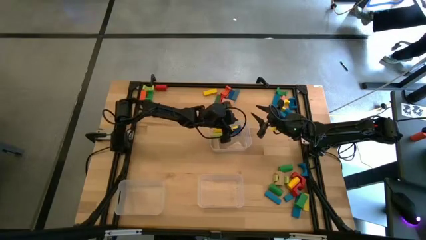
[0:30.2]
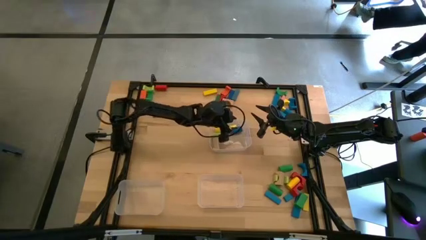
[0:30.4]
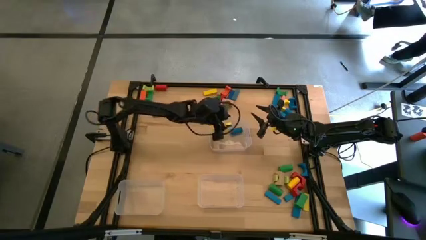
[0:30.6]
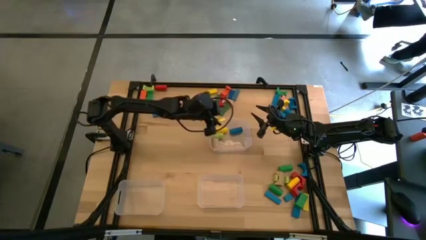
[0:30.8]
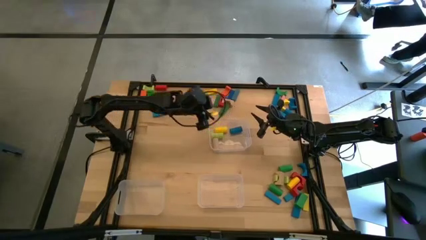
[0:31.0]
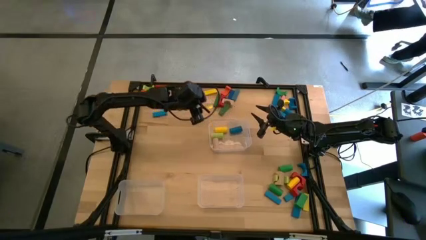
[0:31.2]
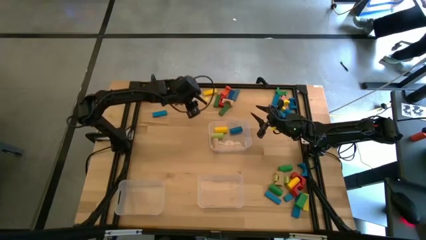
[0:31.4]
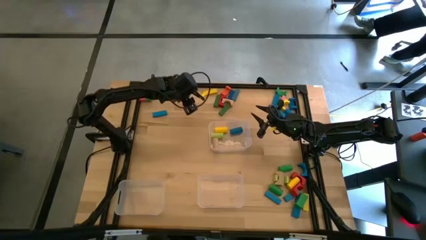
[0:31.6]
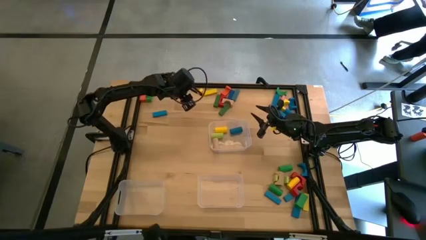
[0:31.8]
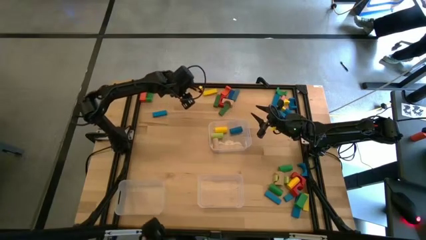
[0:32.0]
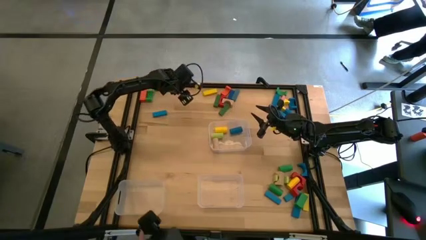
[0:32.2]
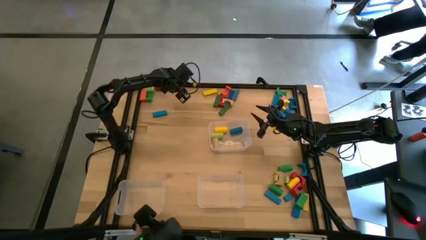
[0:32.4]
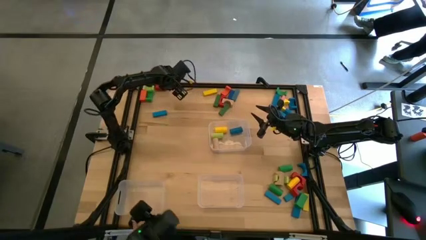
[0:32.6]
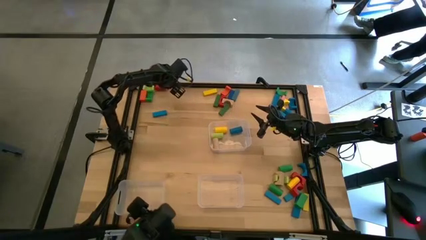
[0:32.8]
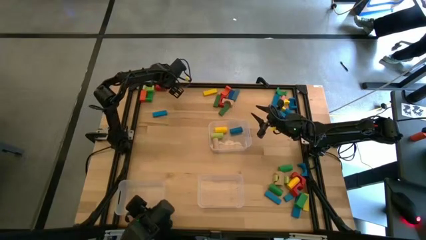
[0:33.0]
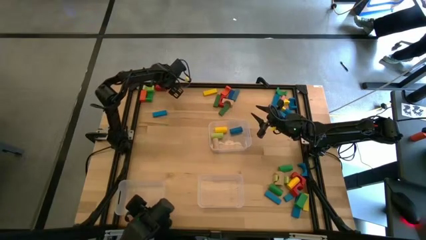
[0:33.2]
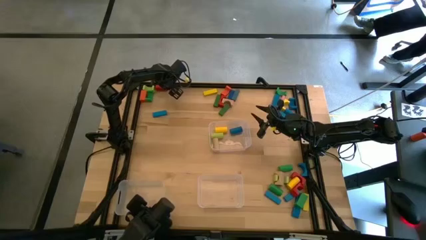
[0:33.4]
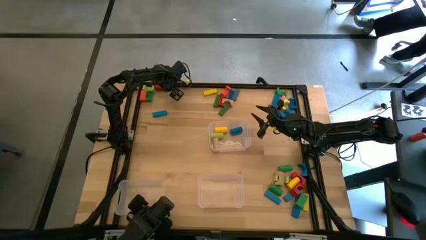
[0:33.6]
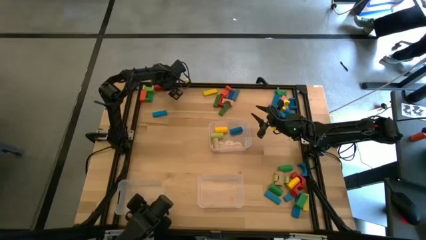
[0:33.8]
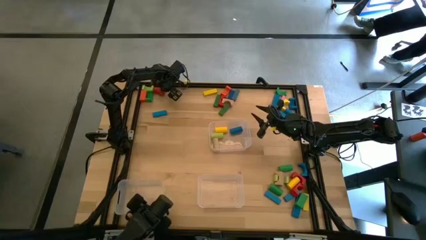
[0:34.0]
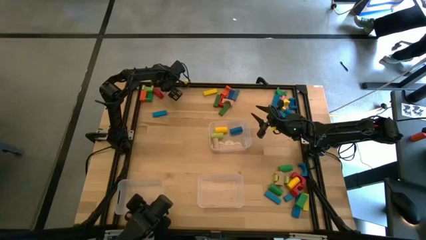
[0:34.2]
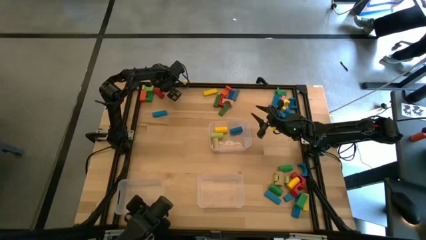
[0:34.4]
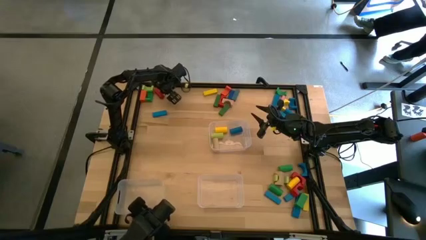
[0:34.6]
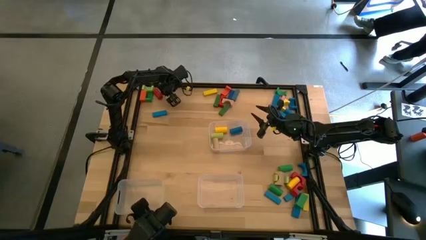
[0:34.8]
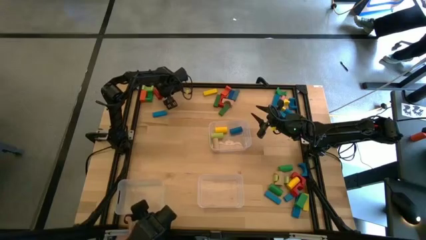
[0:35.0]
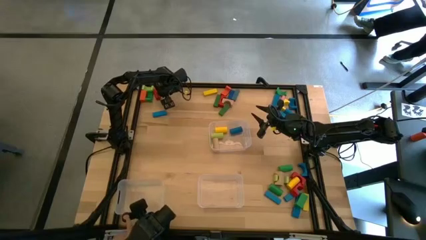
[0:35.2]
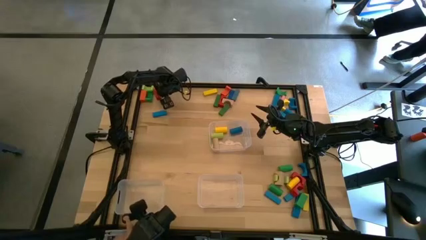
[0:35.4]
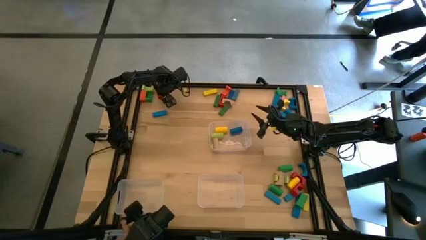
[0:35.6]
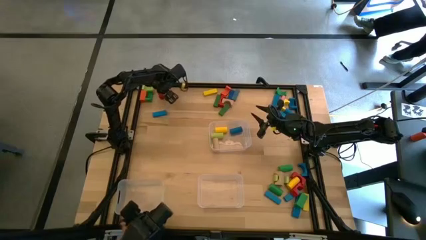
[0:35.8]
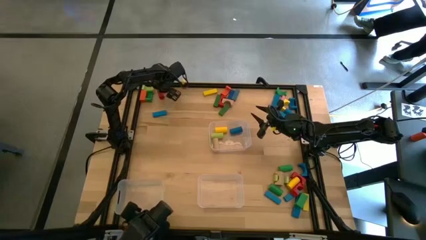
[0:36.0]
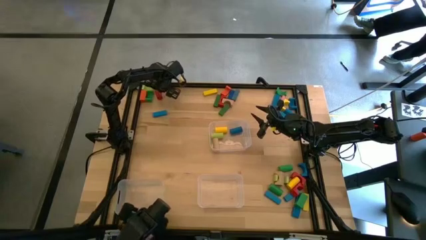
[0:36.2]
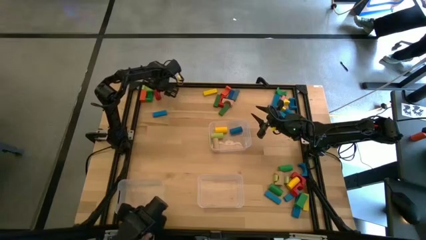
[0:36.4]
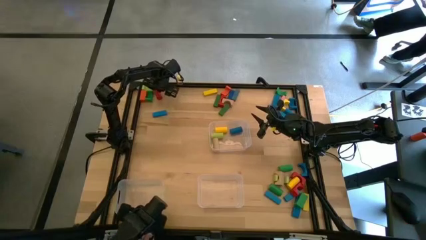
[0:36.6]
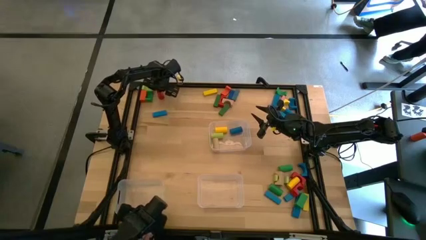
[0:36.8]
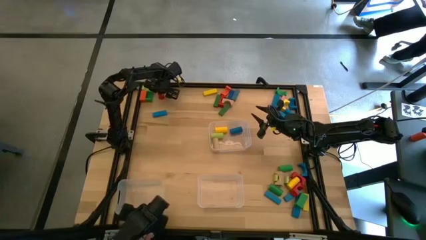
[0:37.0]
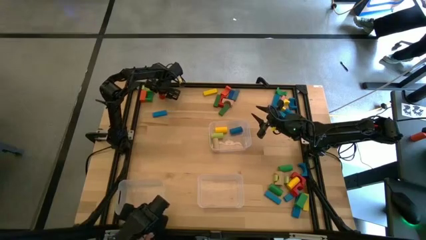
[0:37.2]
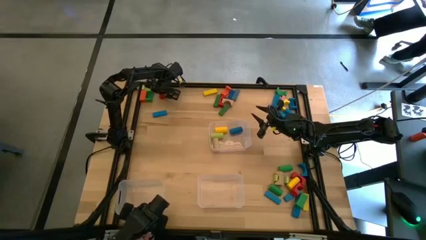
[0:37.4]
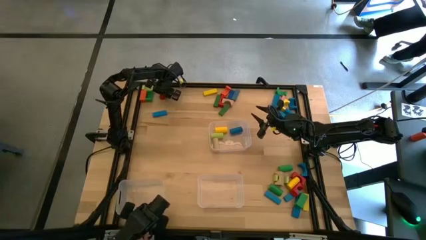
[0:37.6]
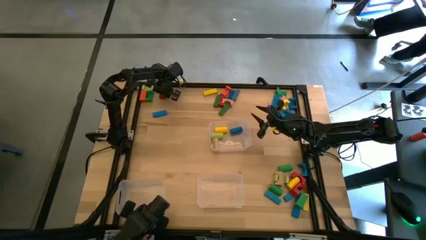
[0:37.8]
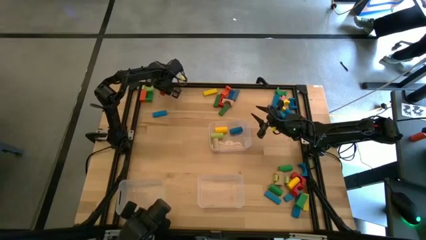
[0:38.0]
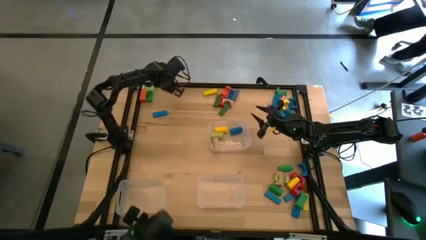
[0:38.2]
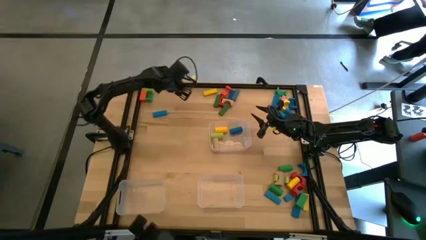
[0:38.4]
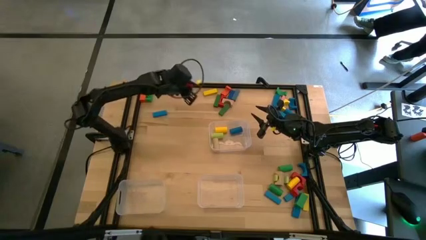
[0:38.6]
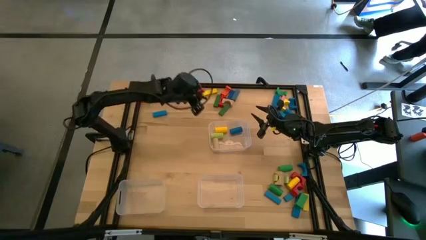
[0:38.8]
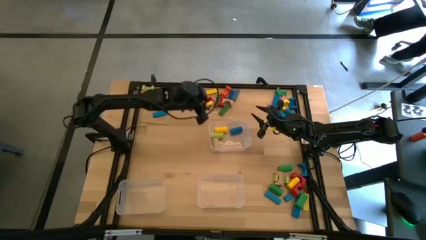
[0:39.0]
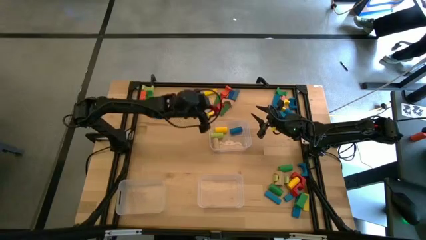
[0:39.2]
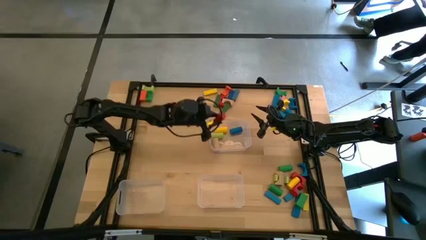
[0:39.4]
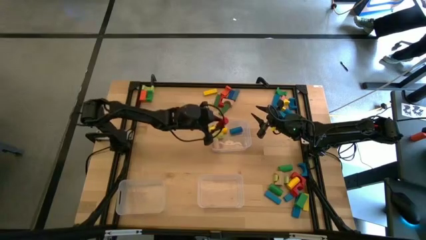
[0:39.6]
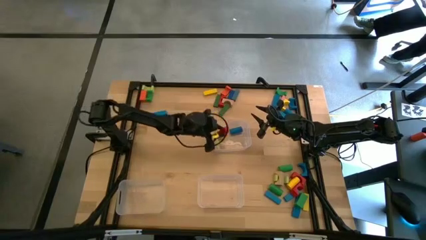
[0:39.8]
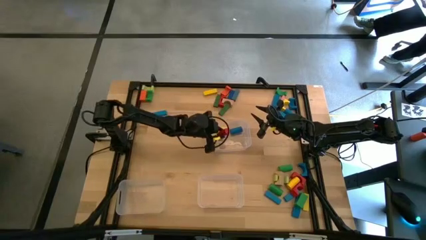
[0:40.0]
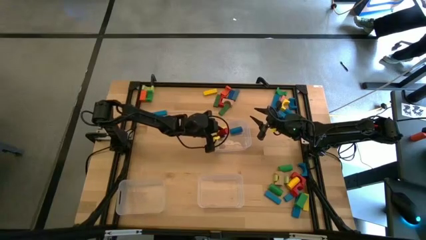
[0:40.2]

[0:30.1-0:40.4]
Task: Sort blocks by size
Put the red cylindrical block into the top transparent bin

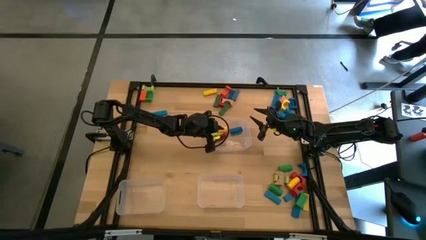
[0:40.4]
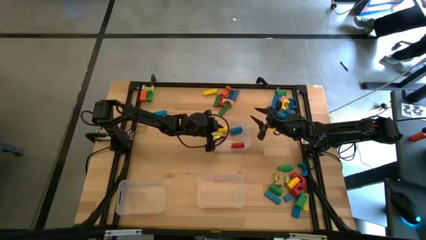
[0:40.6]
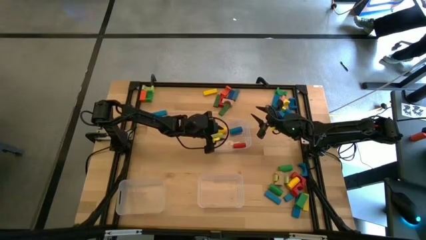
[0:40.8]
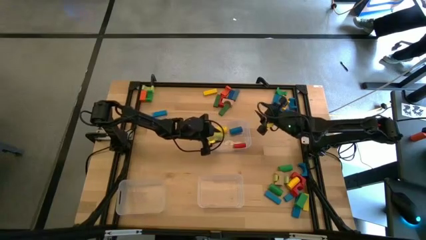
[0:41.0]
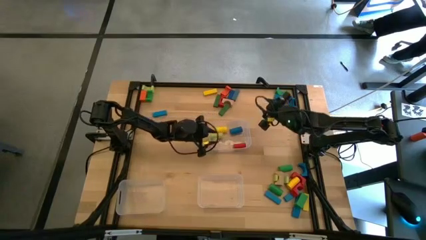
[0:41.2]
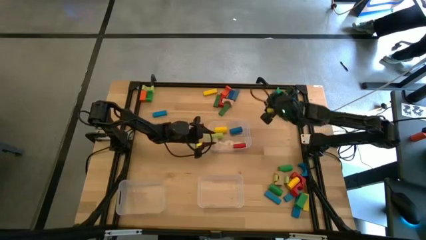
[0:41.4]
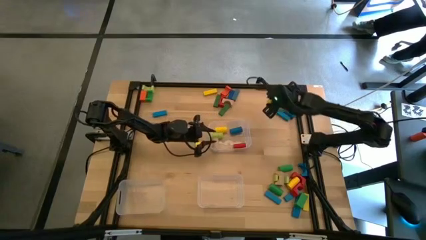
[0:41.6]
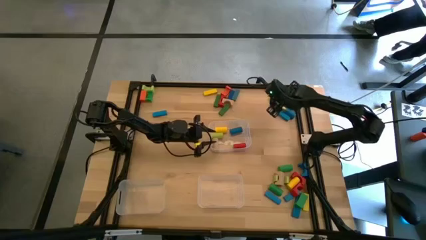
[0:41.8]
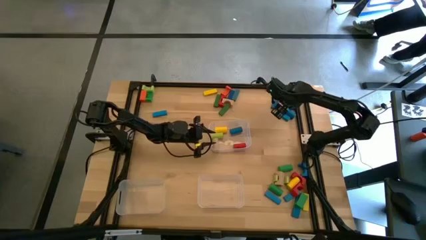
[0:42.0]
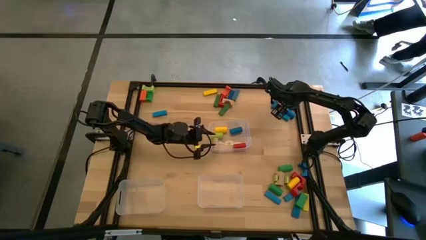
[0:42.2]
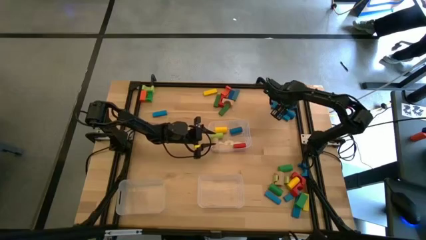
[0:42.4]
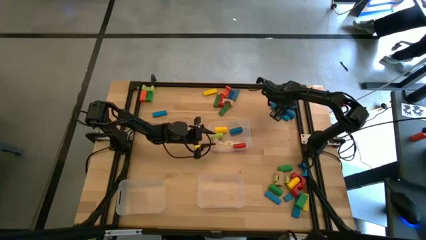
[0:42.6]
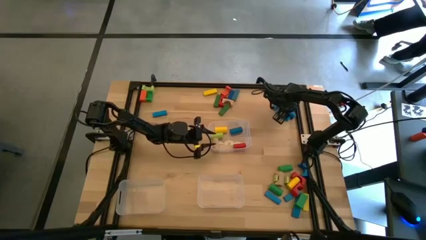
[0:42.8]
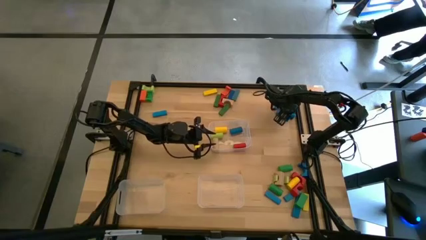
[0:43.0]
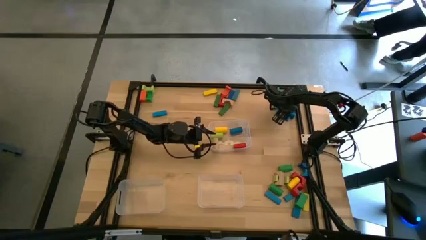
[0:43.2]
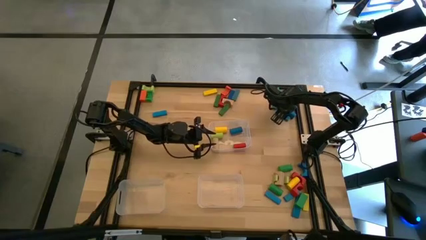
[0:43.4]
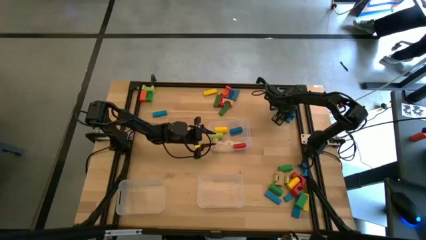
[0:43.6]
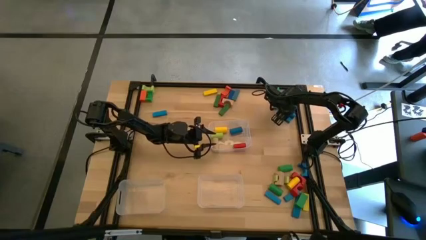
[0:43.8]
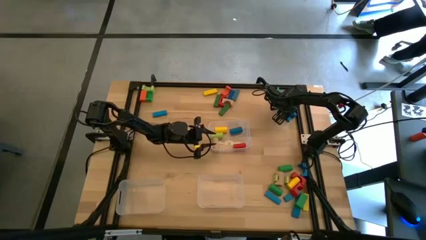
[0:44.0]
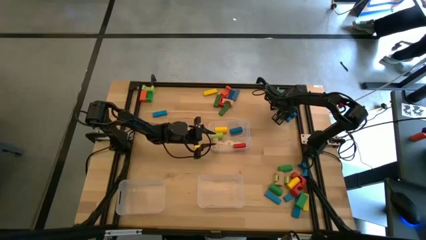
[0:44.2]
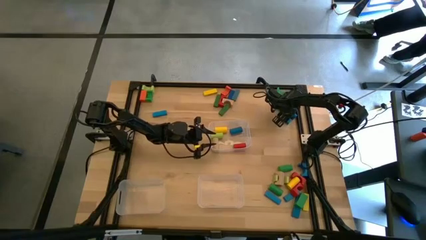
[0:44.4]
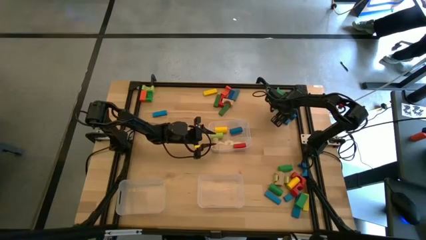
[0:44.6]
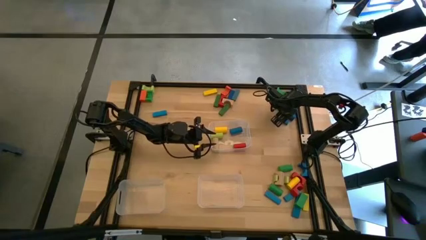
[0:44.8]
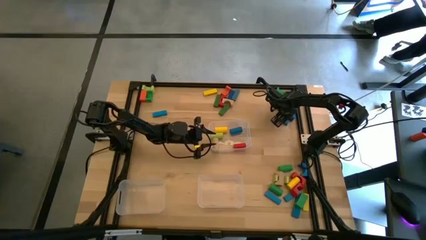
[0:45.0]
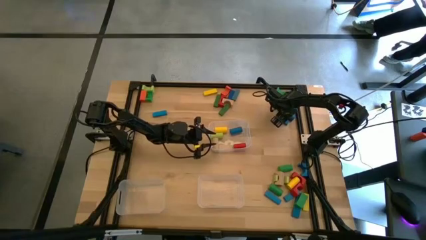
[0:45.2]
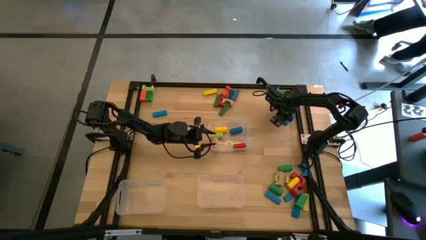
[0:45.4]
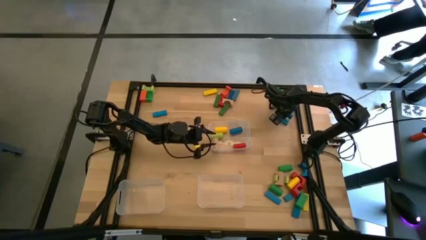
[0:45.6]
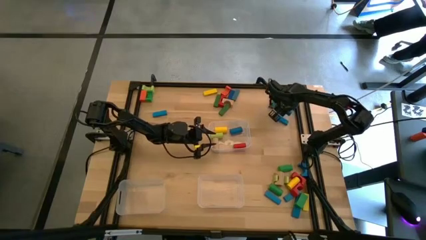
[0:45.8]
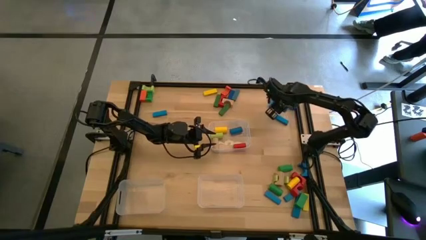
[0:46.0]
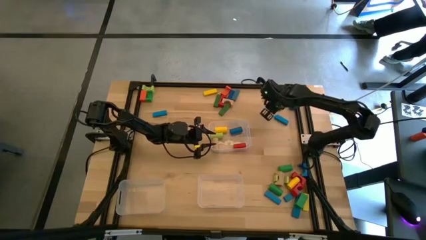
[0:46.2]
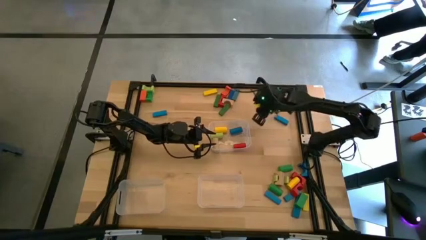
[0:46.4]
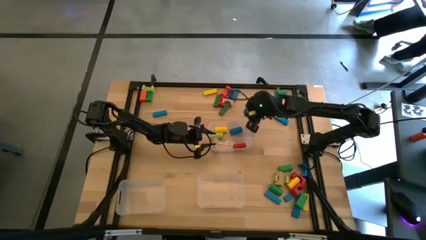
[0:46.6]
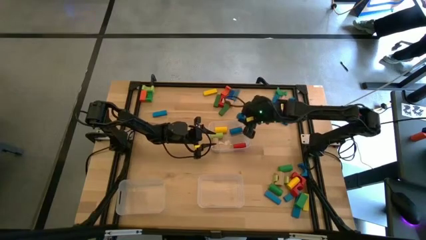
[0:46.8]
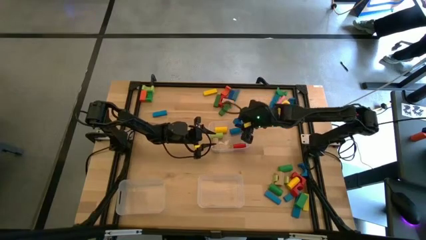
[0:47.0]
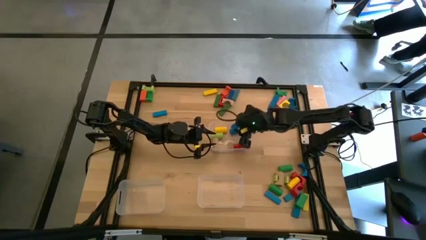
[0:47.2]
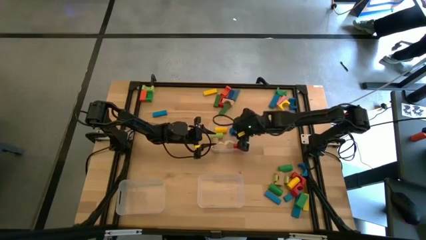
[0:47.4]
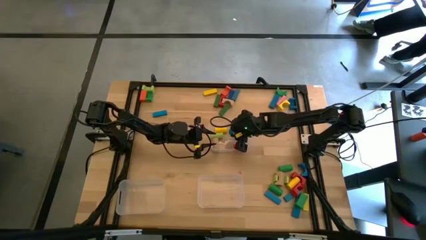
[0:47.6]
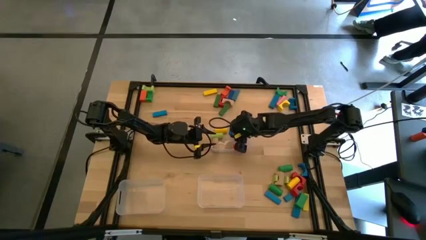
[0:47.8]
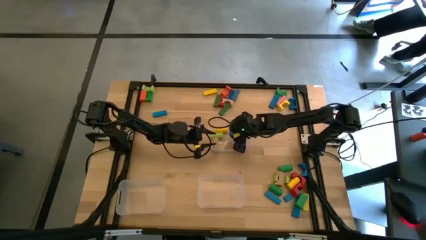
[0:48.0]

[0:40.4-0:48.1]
Put the blue cylindrical block into the top transparent bin
